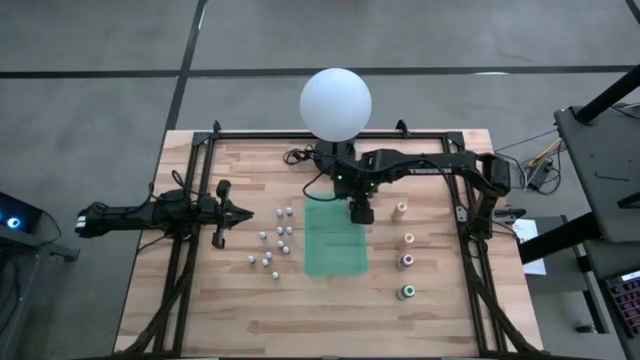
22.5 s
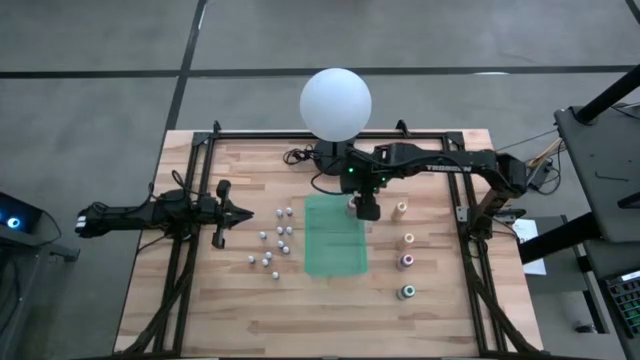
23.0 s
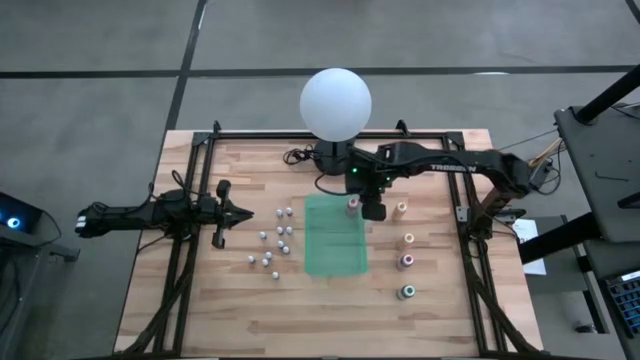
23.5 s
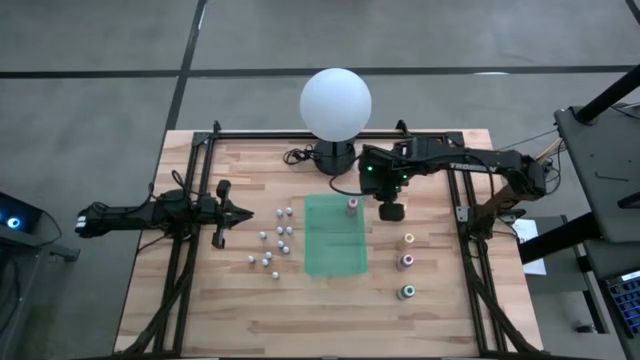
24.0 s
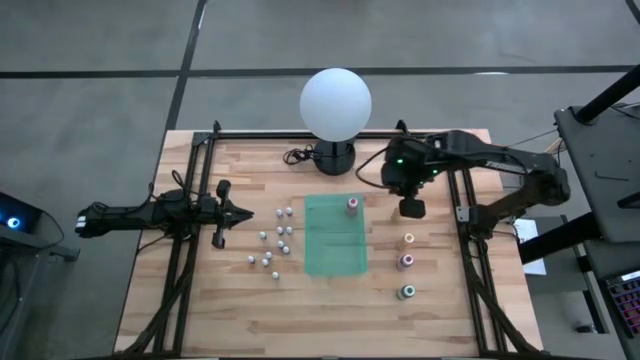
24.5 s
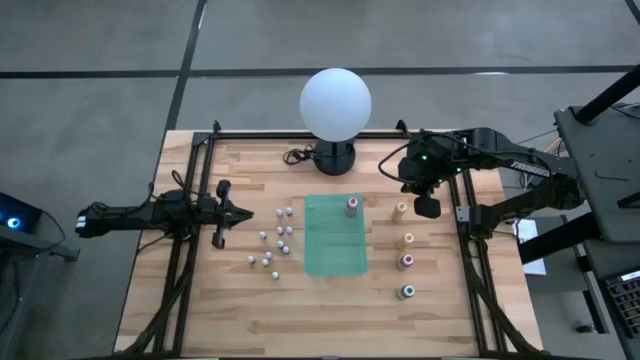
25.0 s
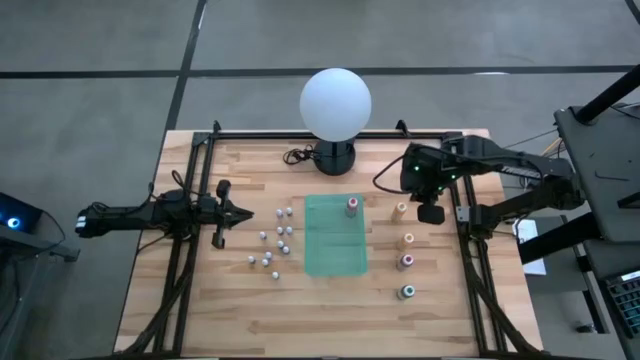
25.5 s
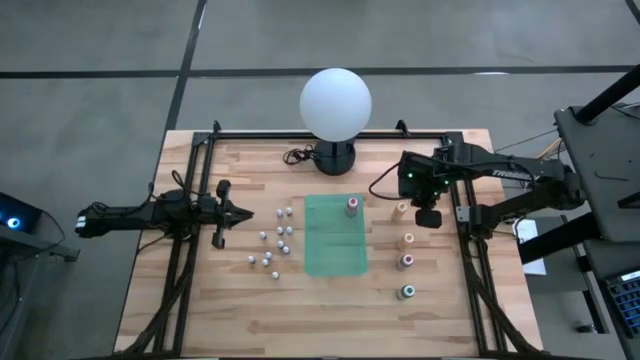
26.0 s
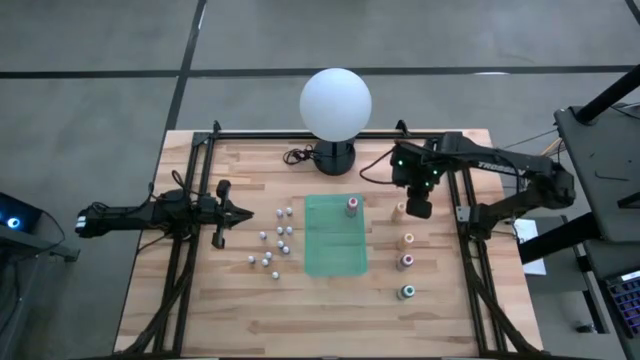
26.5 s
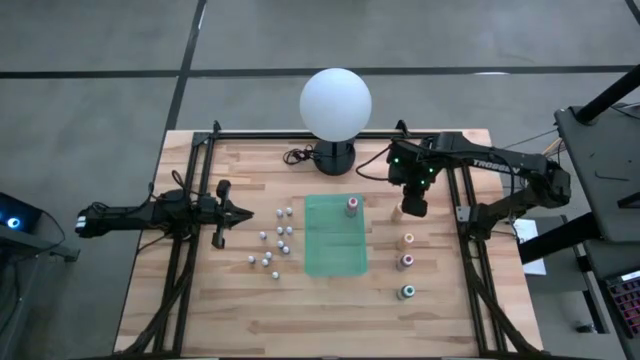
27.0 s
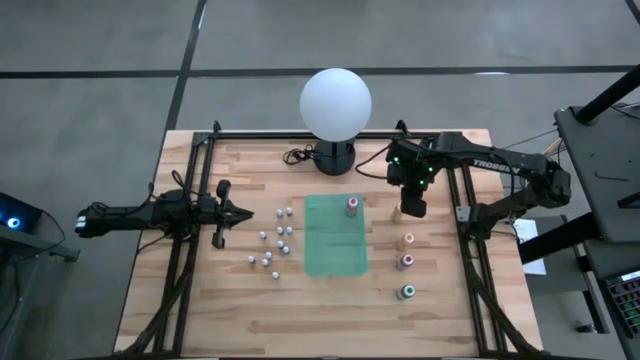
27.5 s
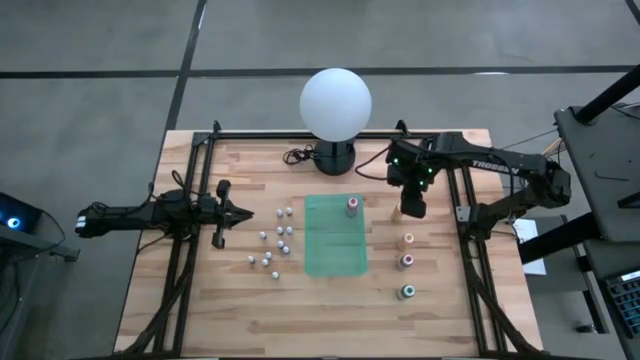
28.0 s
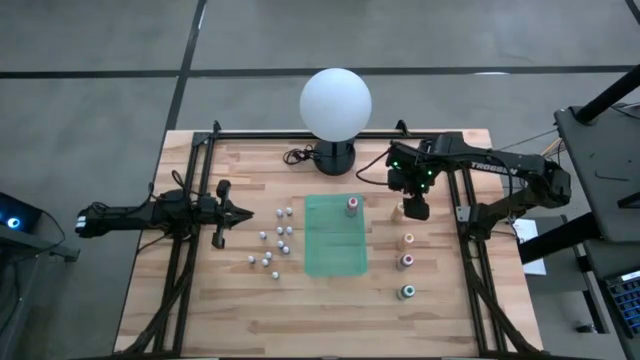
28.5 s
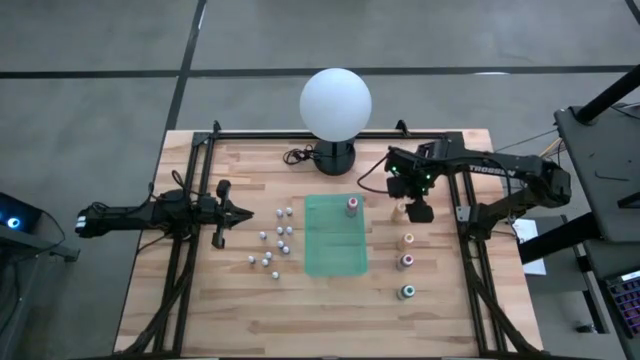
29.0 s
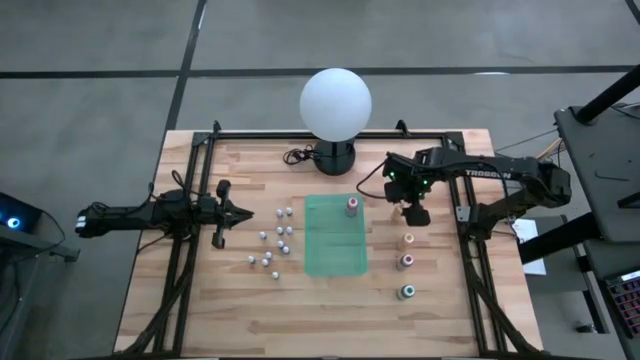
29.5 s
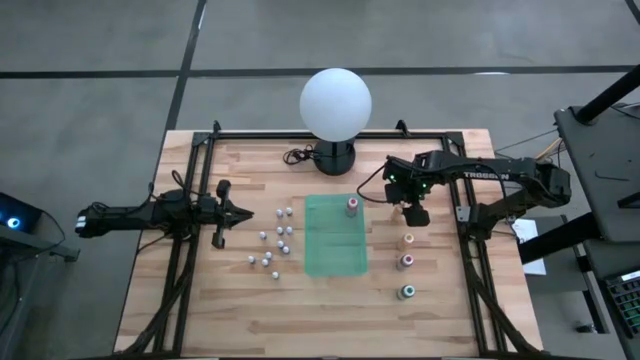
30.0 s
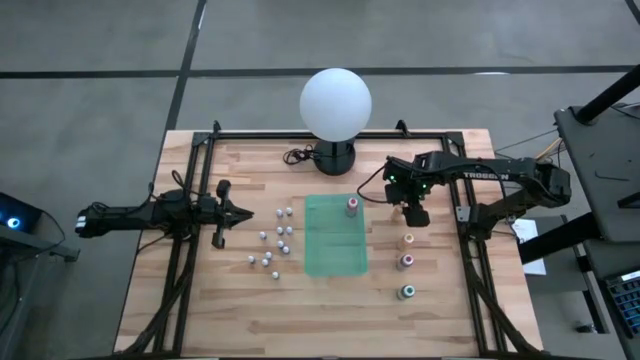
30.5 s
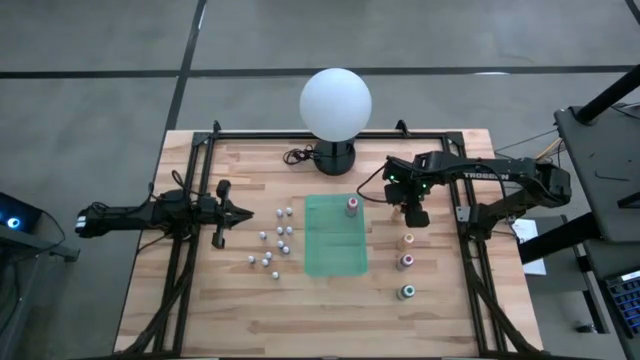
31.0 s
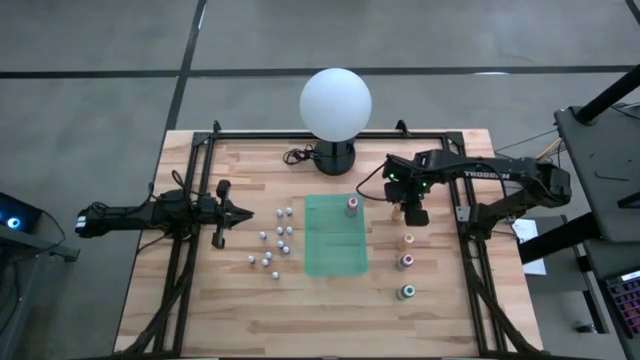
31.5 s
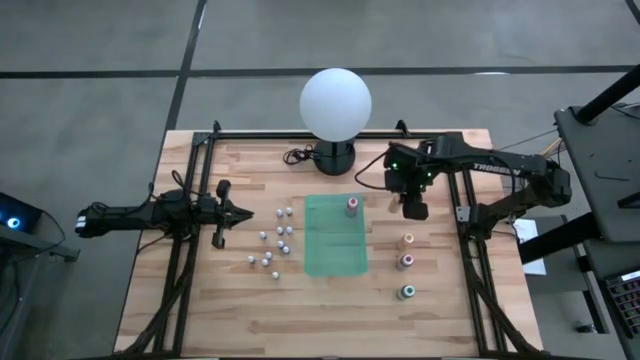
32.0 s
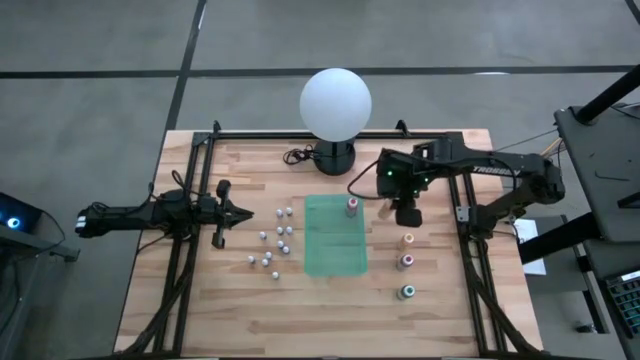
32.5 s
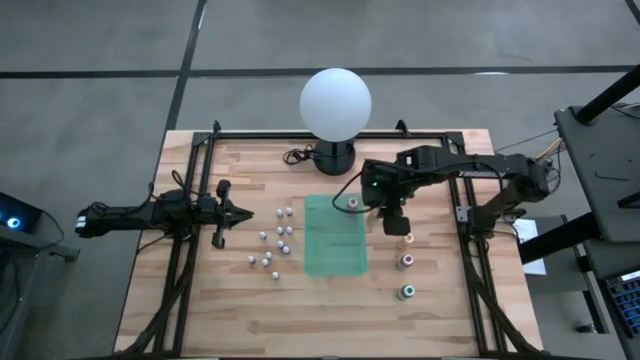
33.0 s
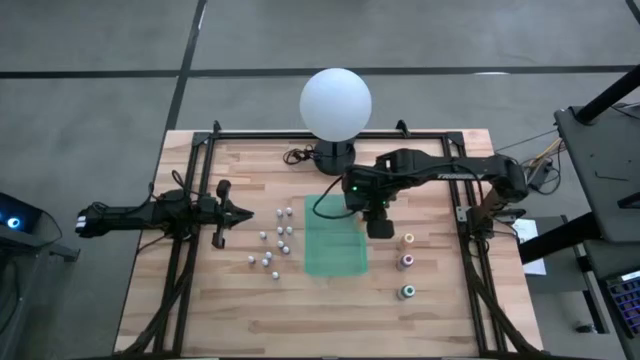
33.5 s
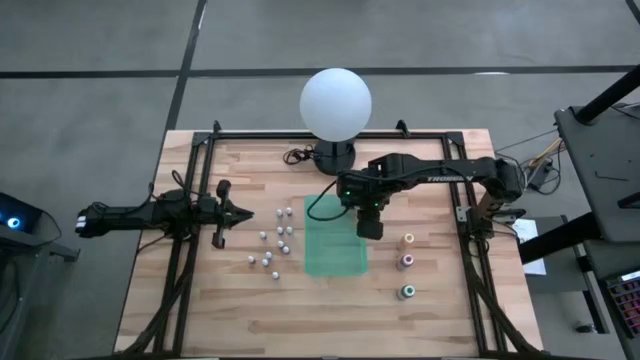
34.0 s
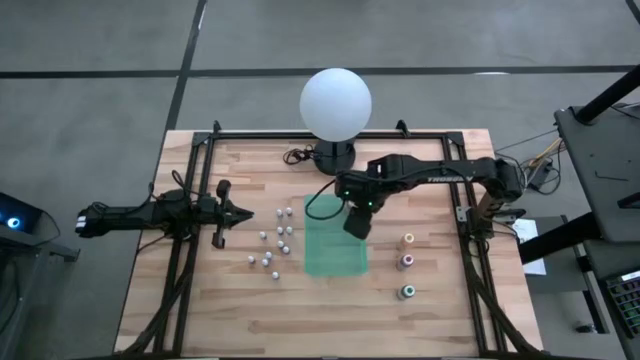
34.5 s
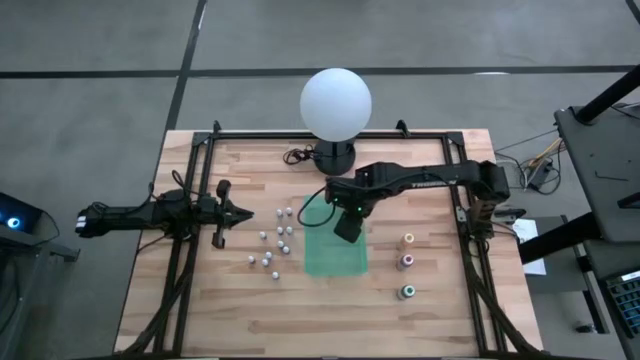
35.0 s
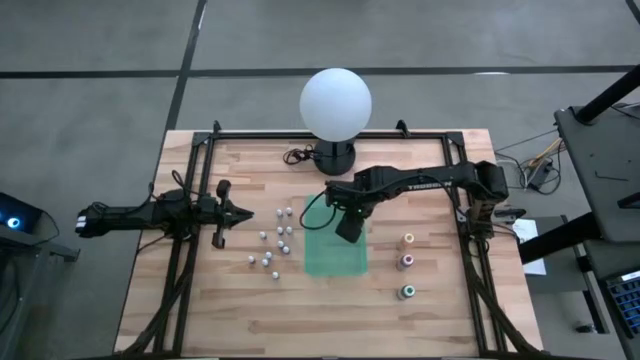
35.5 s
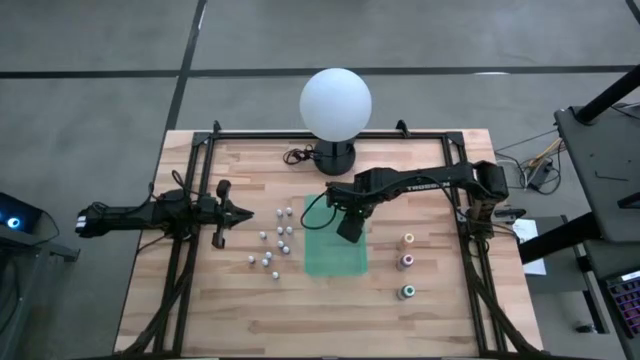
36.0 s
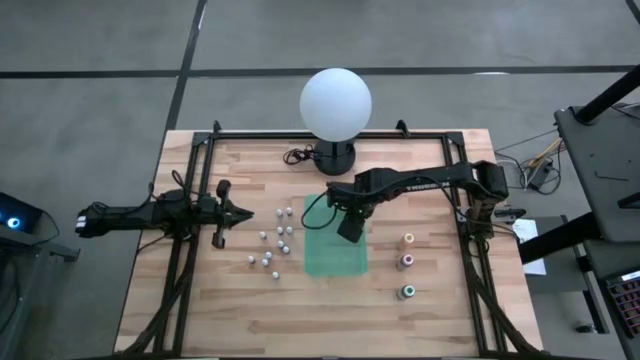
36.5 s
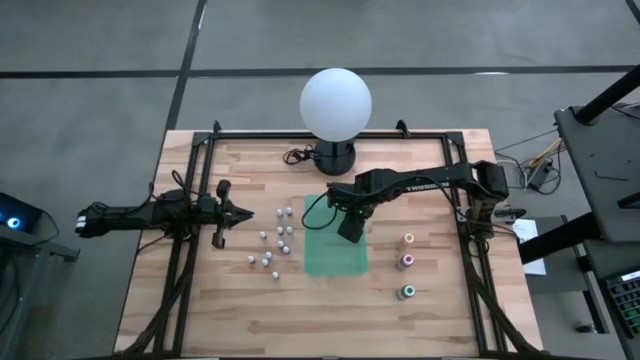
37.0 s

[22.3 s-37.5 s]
Task: Pick & Place food coloring
Put the top large yellow food coloring bottle into the green bin
